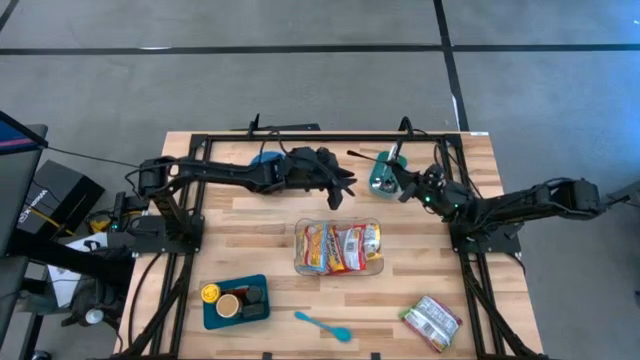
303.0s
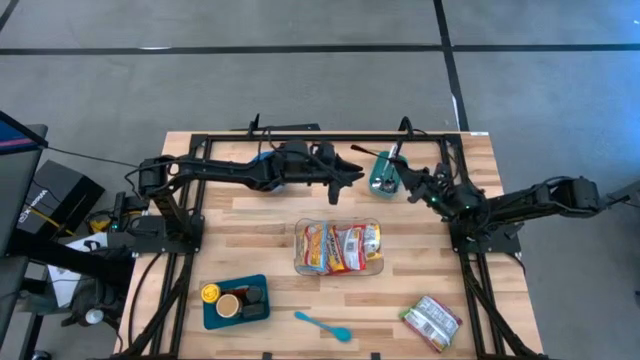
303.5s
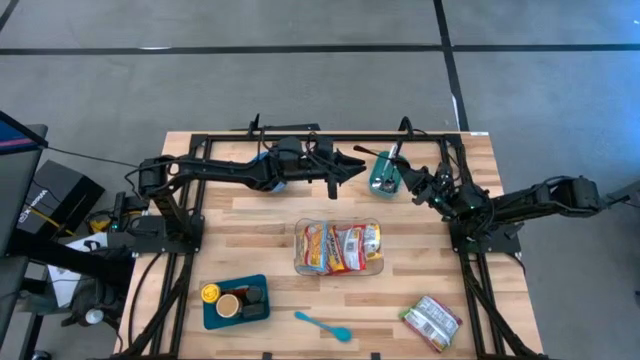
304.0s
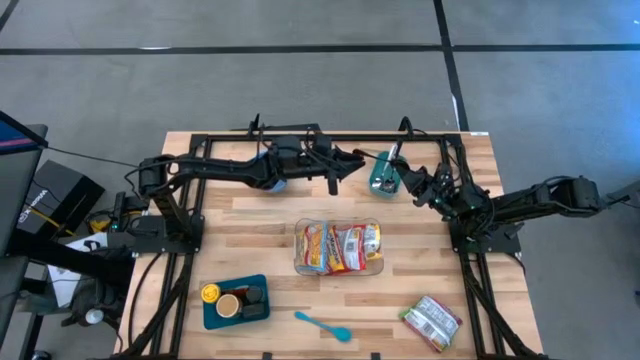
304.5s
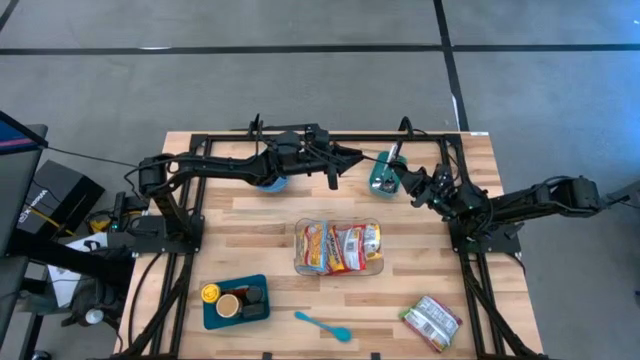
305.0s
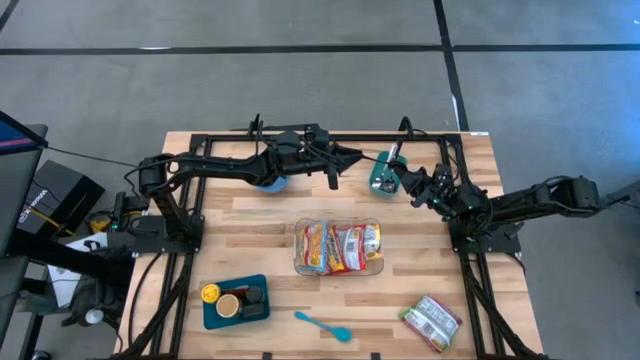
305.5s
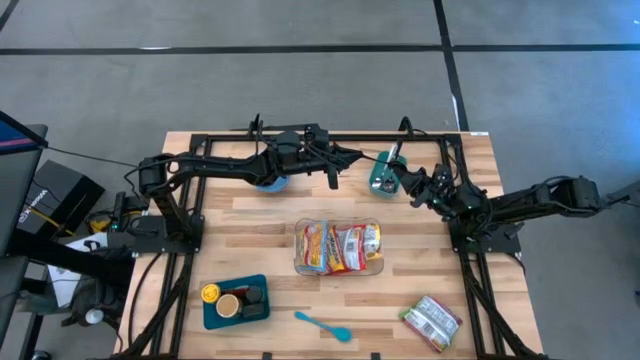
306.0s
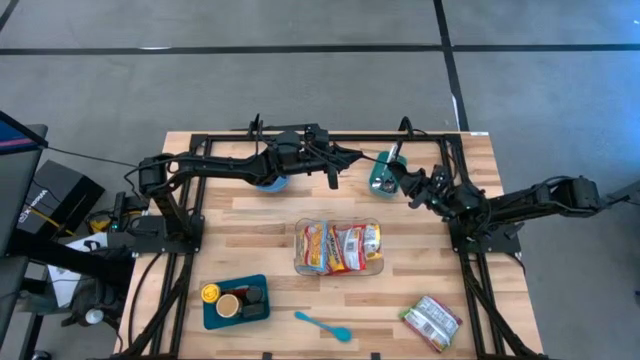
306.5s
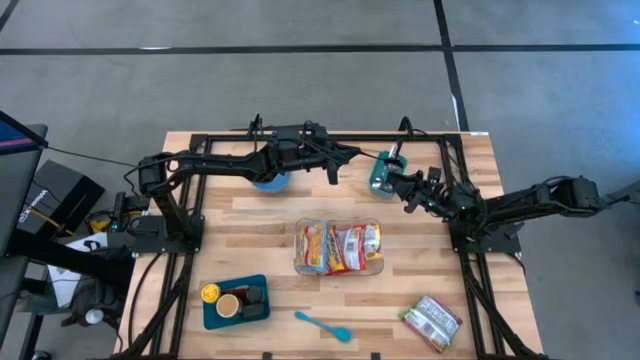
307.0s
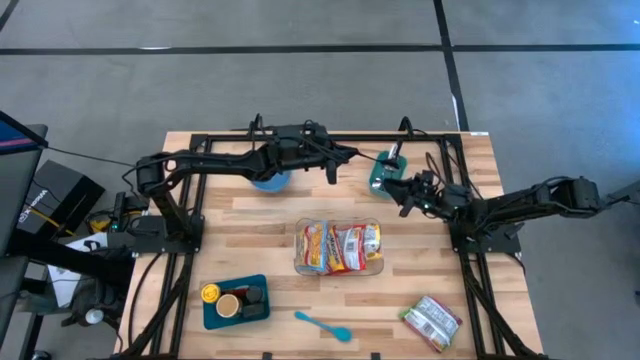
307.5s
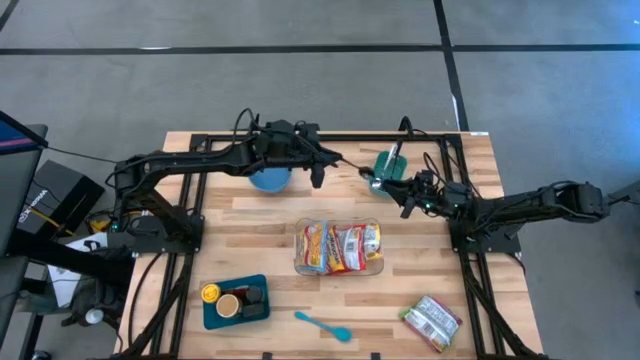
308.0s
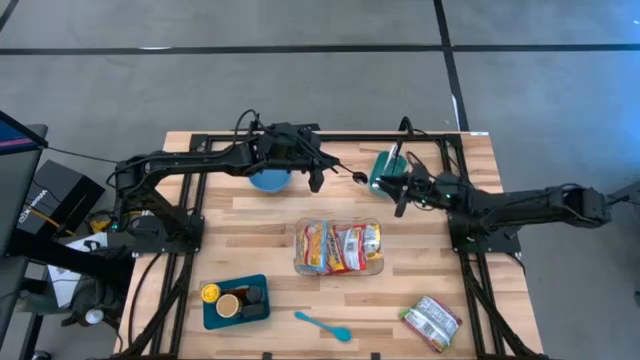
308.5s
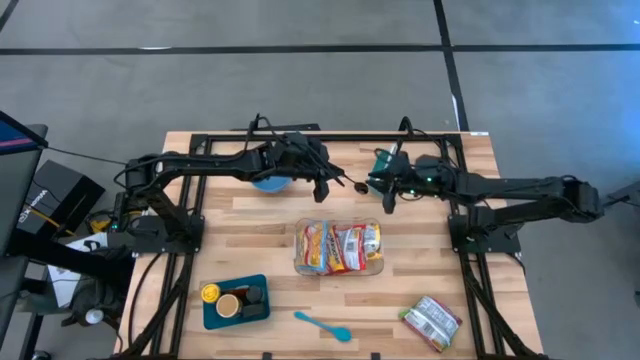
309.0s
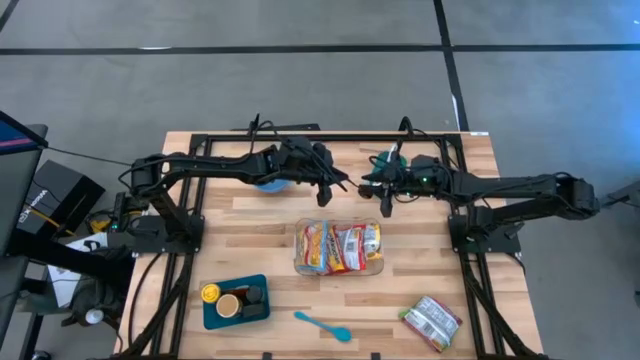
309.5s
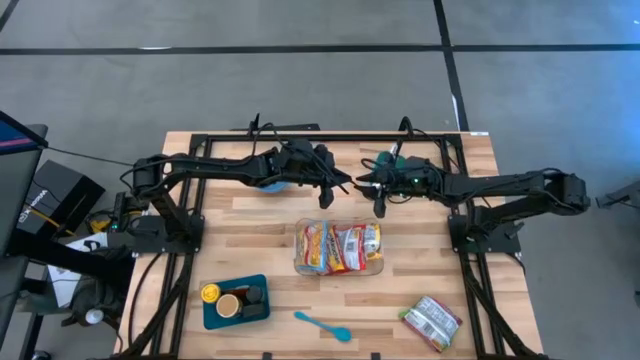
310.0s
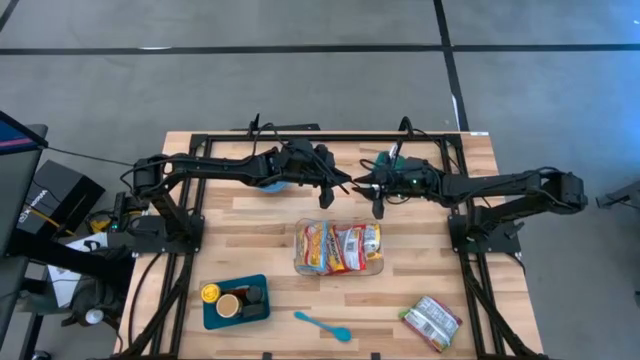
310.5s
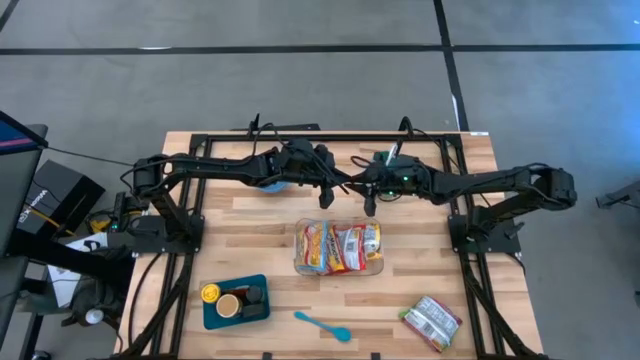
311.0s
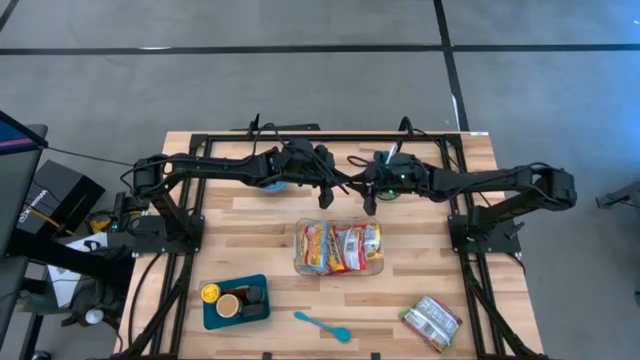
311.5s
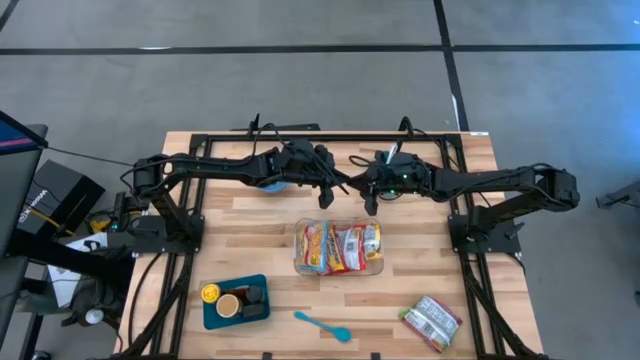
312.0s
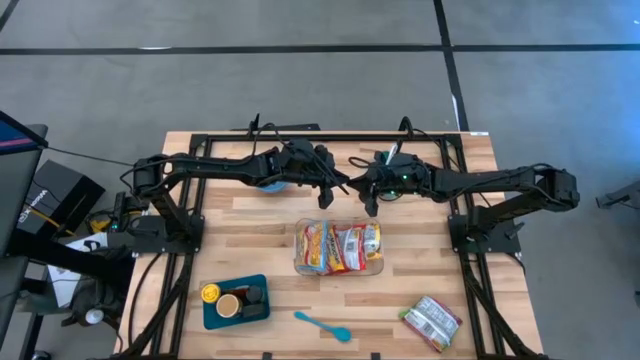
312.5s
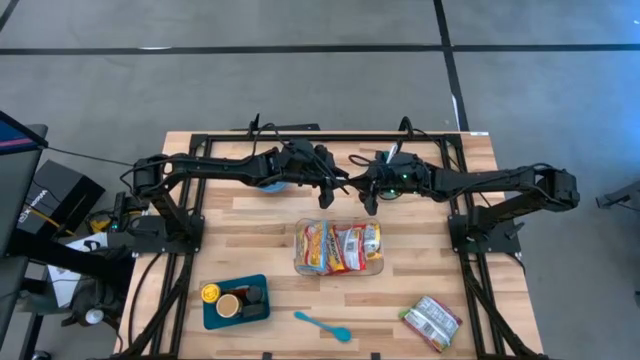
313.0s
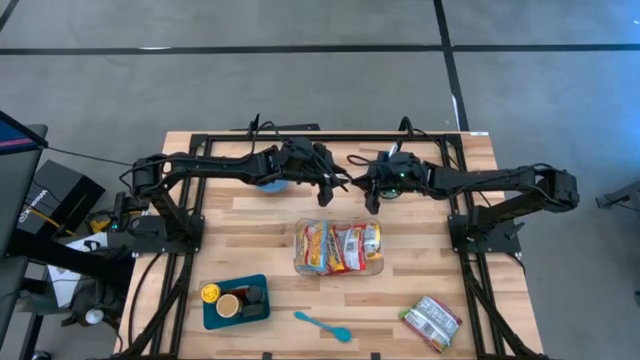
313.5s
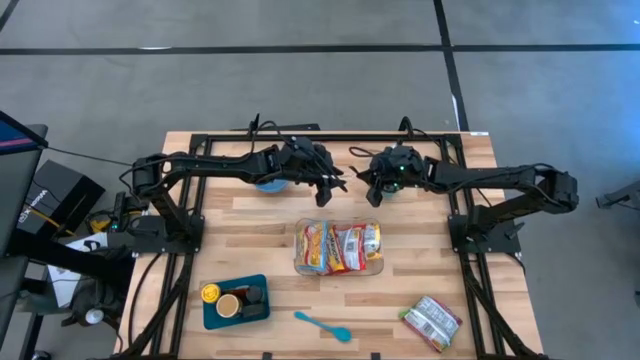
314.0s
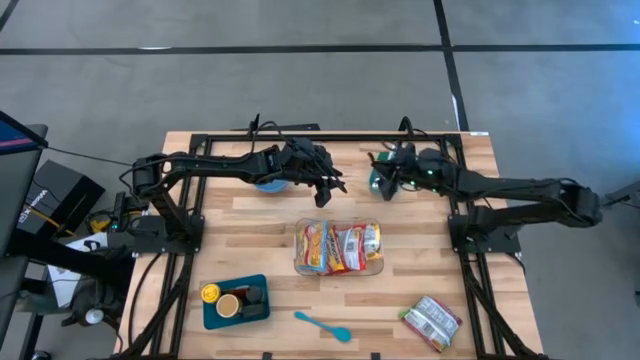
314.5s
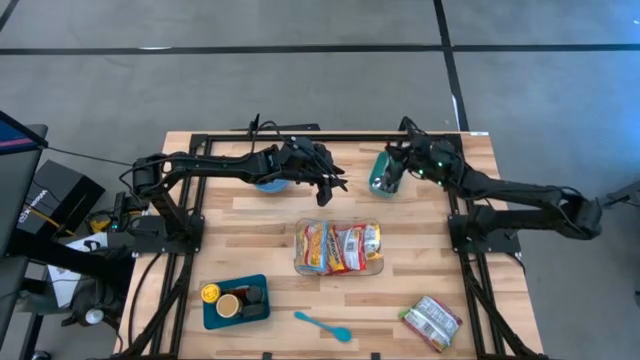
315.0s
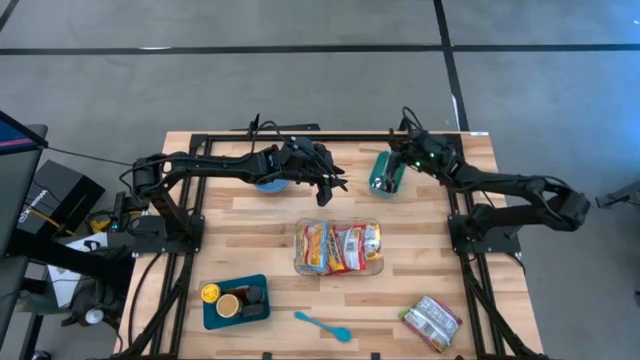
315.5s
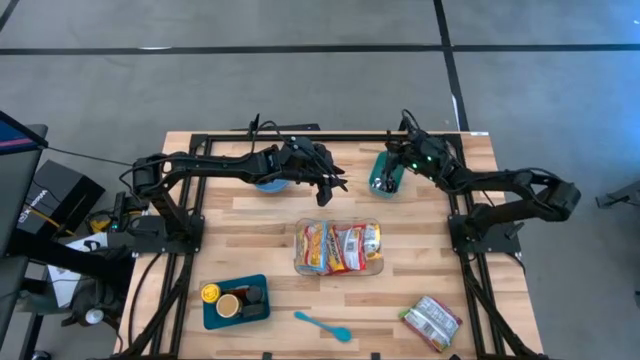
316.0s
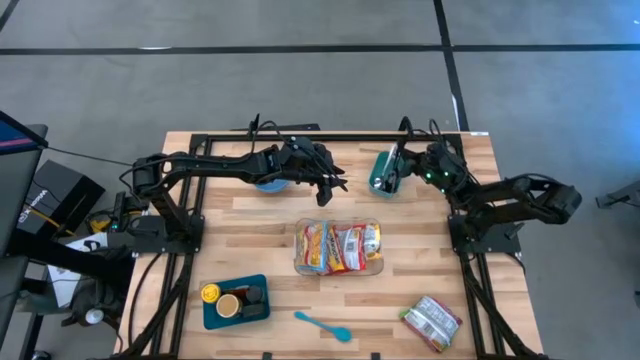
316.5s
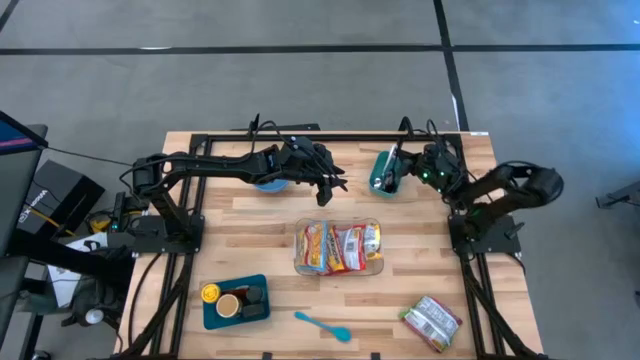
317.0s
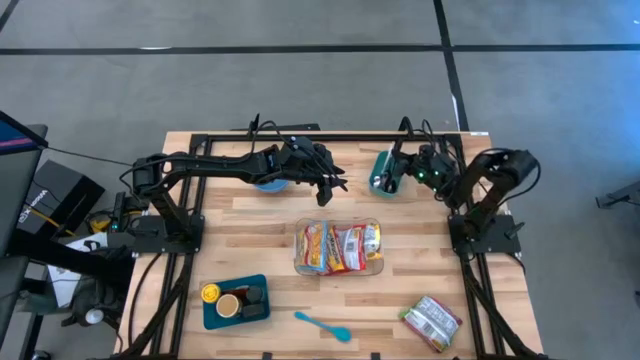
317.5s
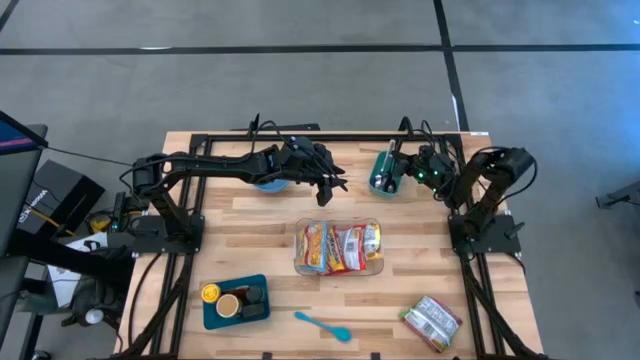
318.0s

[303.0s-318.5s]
Task: Pick & Place Food Item
Put the black spoon into the blue bin

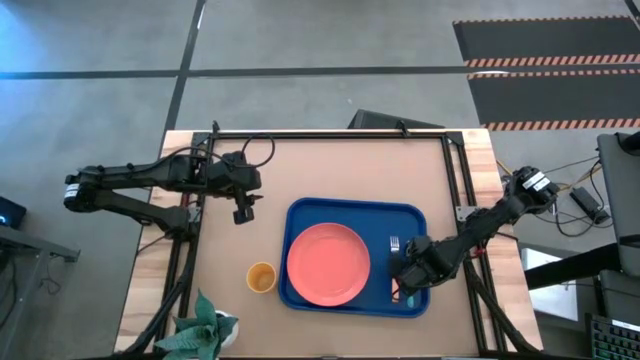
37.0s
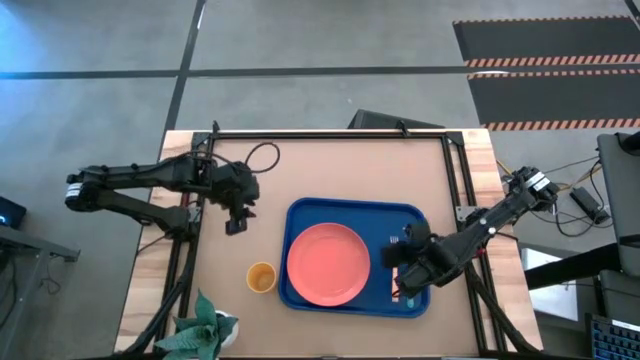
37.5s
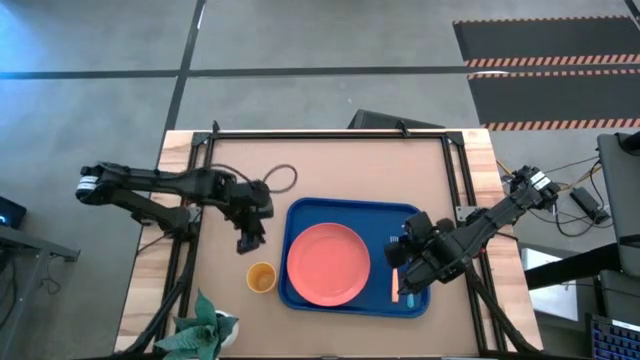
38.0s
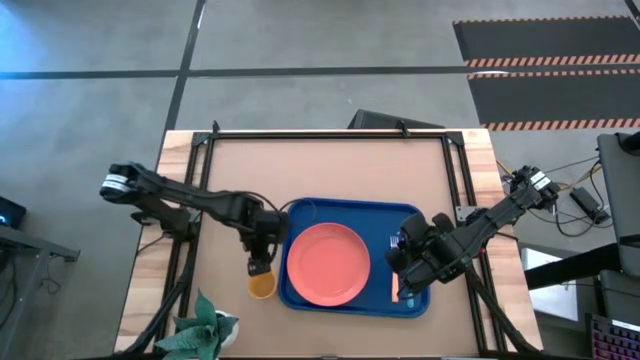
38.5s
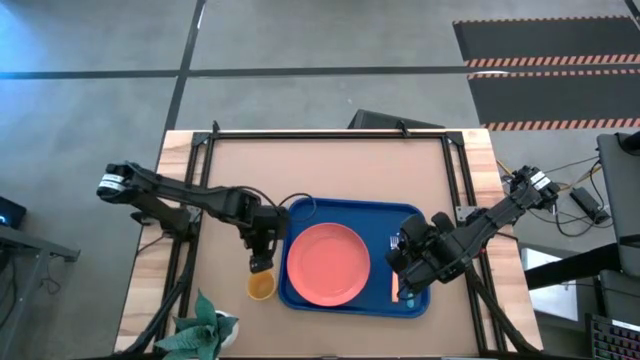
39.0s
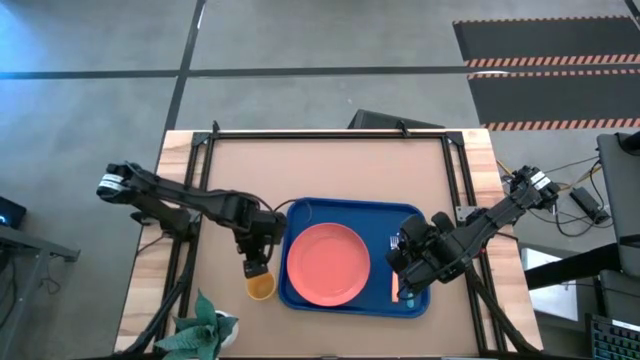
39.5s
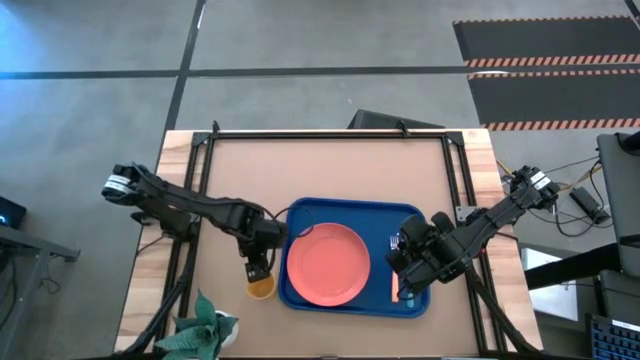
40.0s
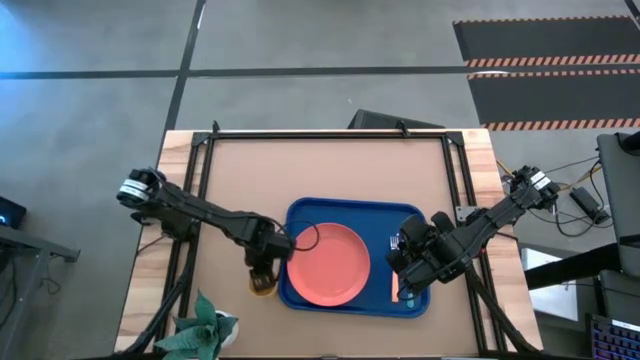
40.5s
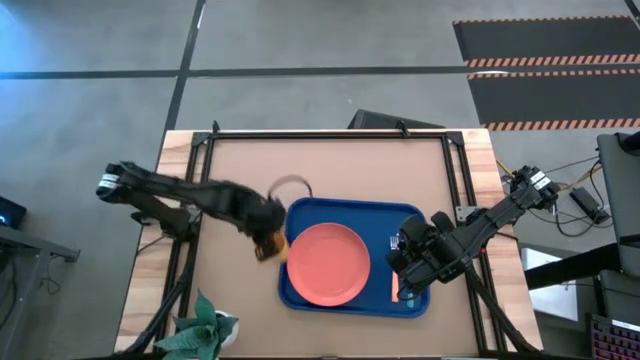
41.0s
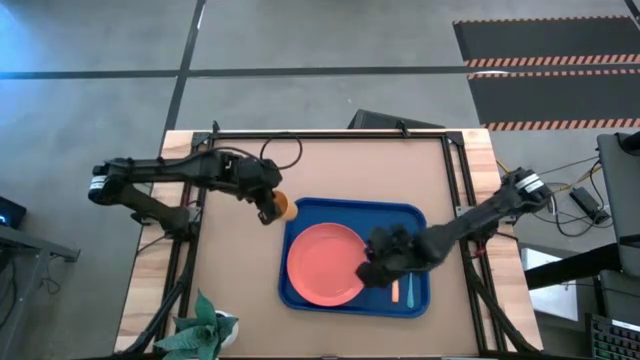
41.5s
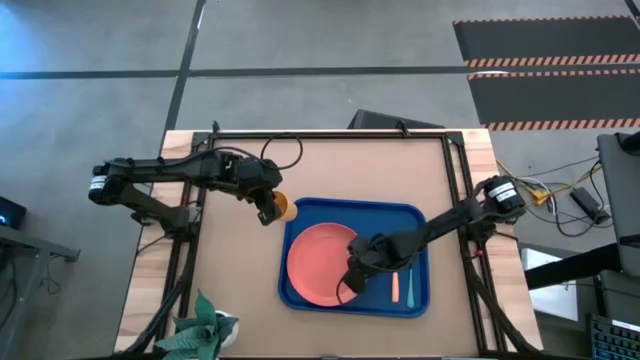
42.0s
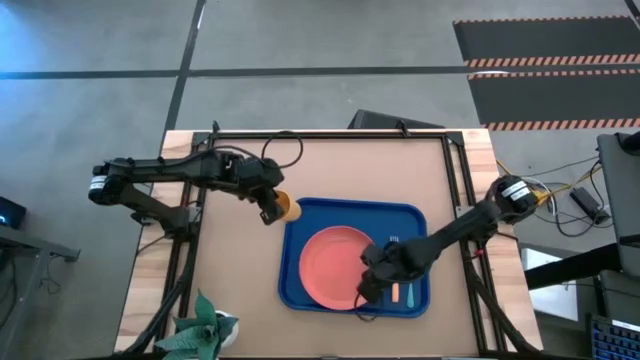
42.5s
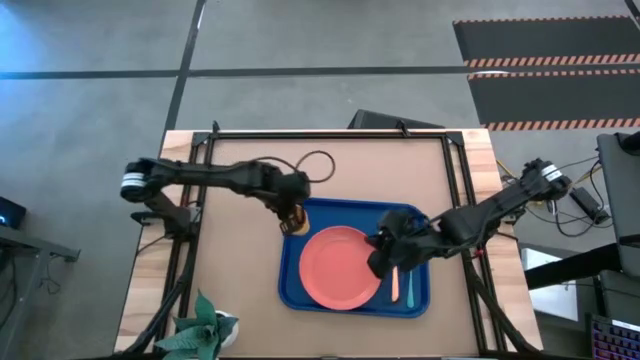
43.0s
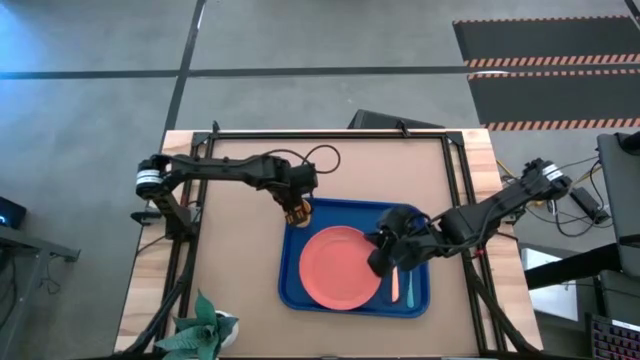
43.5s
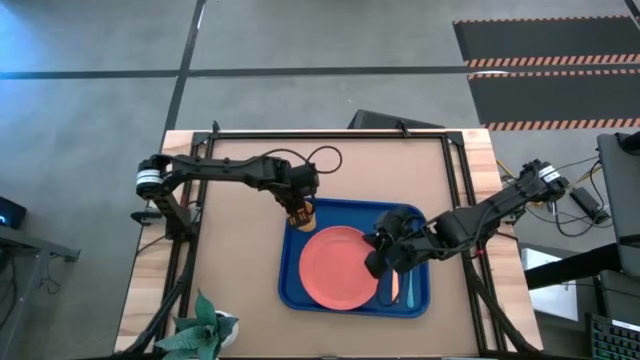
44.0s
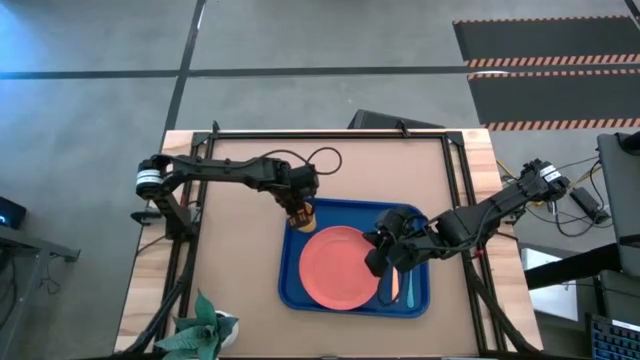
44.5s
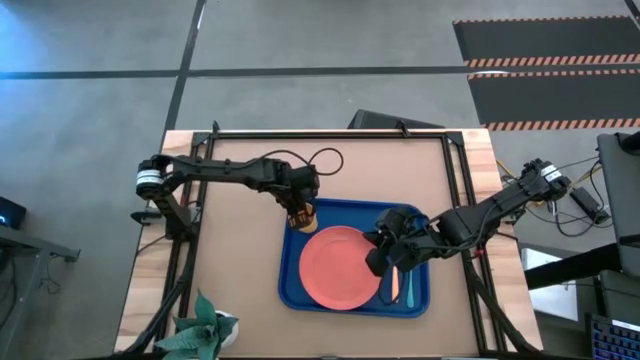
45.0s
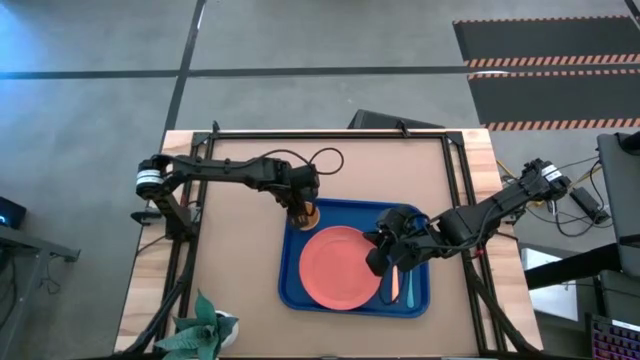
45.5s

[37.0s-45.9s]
Task: Pick and place plate/cup/fork/spoon on tray
Put the yellow cup in the top left corner of the blue tray
